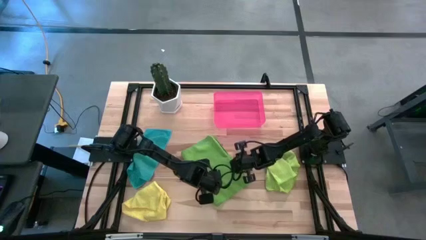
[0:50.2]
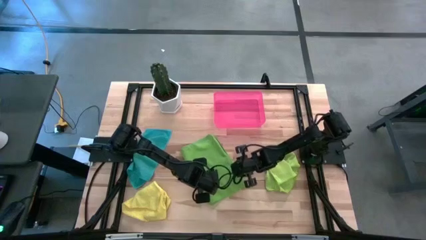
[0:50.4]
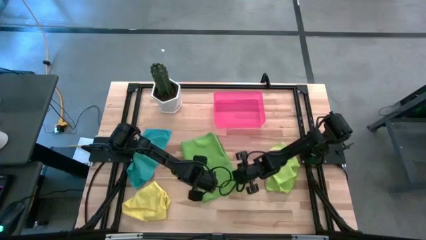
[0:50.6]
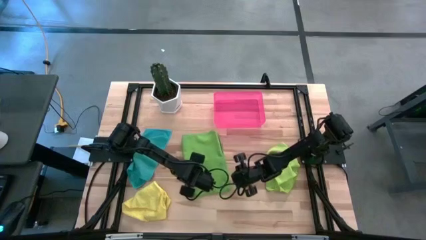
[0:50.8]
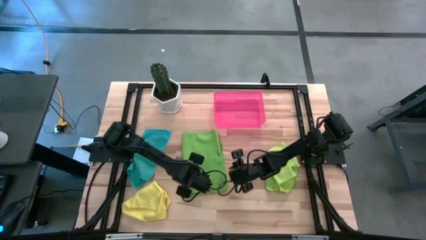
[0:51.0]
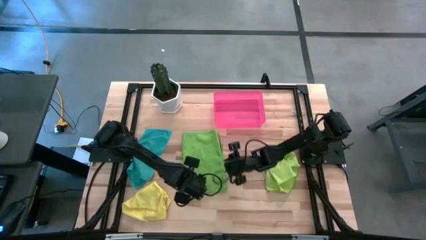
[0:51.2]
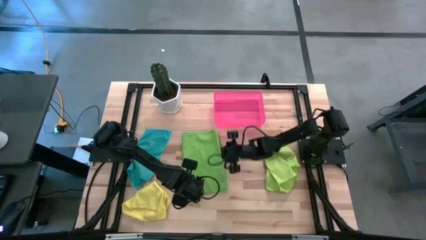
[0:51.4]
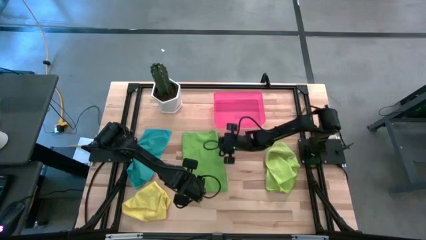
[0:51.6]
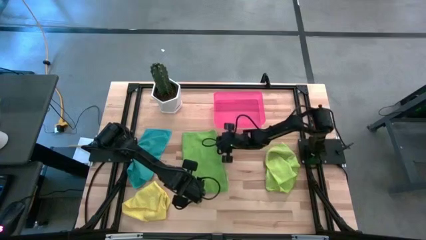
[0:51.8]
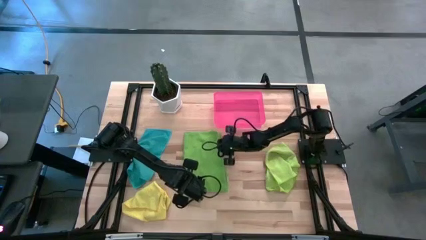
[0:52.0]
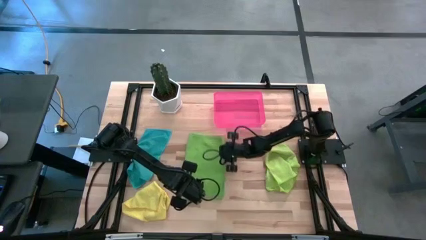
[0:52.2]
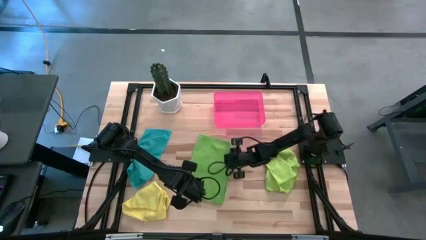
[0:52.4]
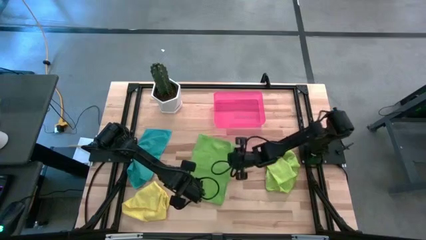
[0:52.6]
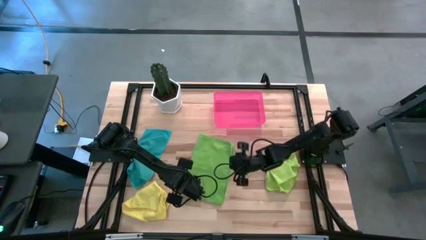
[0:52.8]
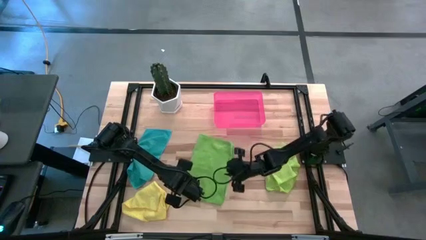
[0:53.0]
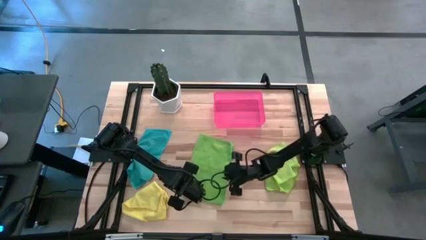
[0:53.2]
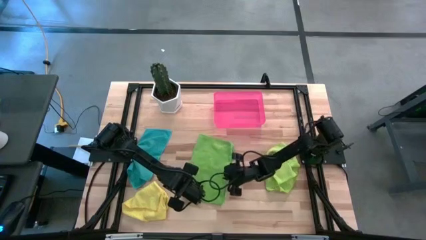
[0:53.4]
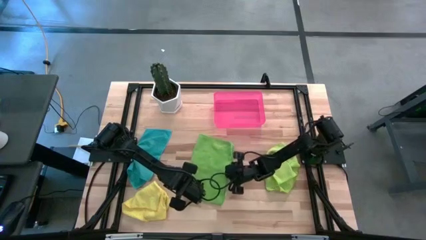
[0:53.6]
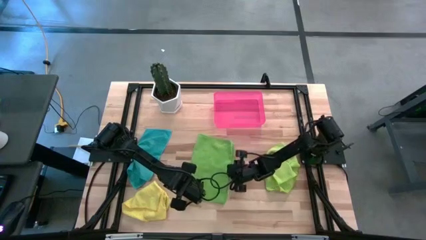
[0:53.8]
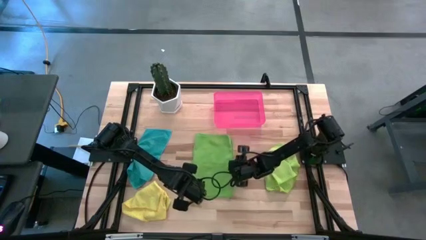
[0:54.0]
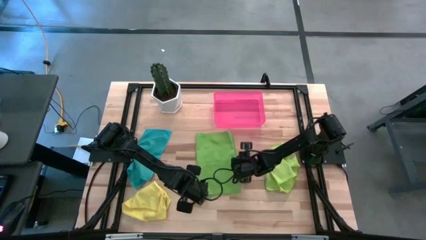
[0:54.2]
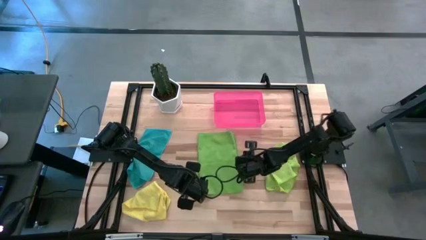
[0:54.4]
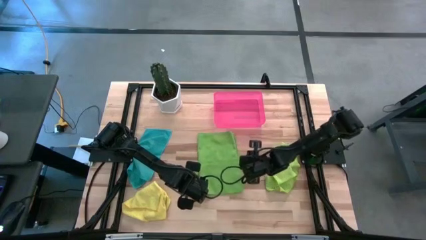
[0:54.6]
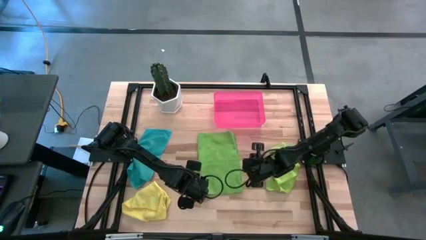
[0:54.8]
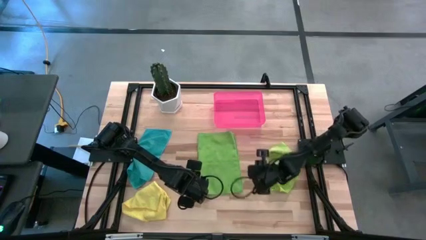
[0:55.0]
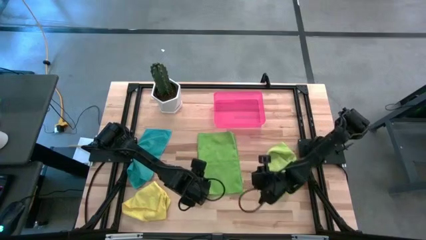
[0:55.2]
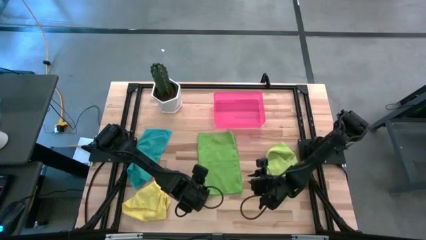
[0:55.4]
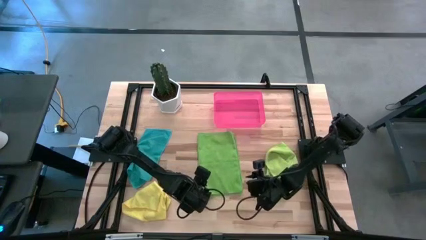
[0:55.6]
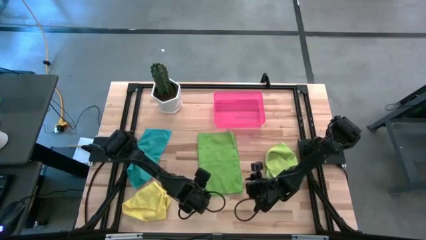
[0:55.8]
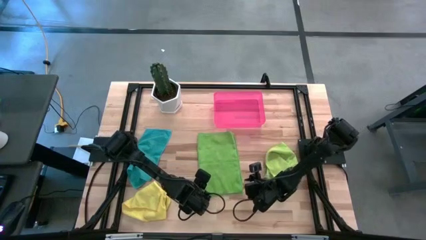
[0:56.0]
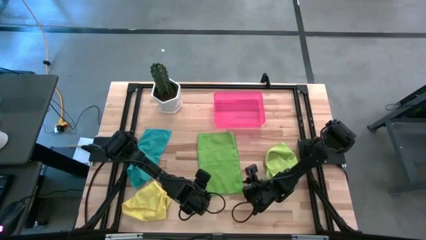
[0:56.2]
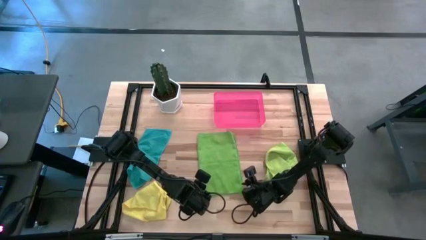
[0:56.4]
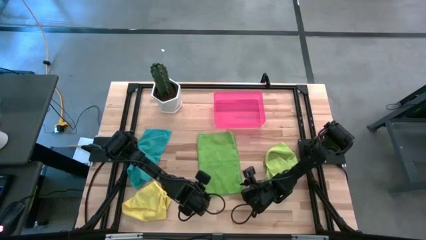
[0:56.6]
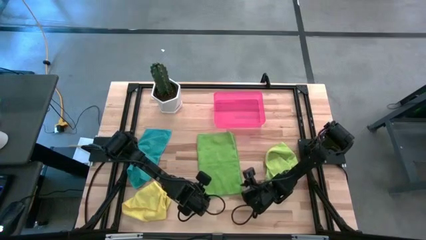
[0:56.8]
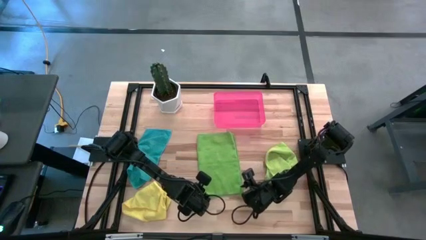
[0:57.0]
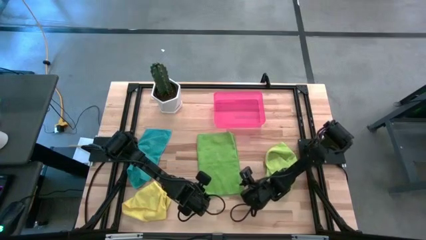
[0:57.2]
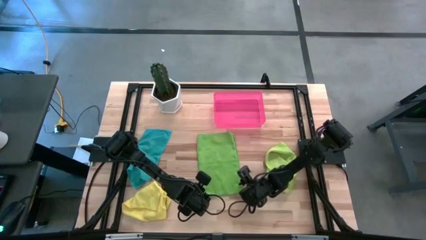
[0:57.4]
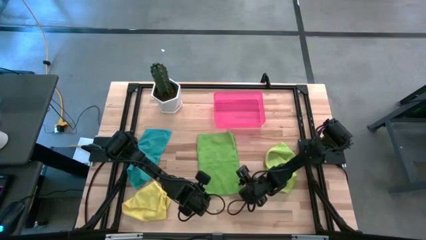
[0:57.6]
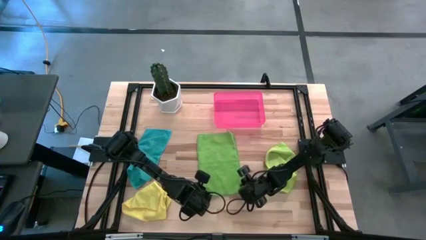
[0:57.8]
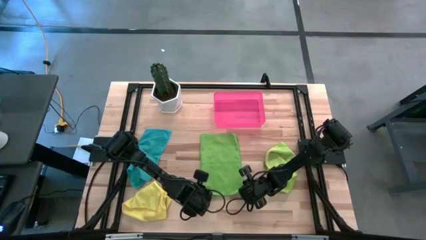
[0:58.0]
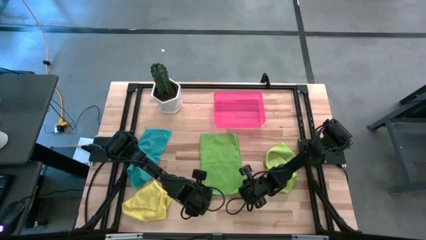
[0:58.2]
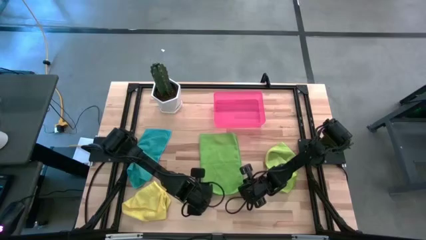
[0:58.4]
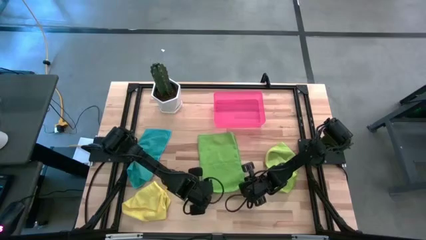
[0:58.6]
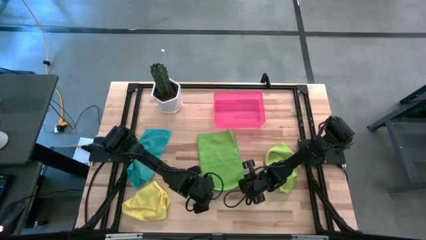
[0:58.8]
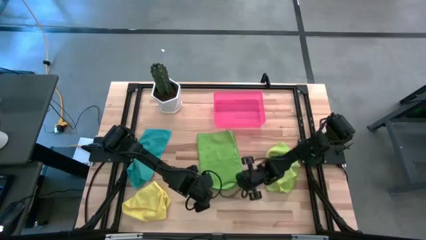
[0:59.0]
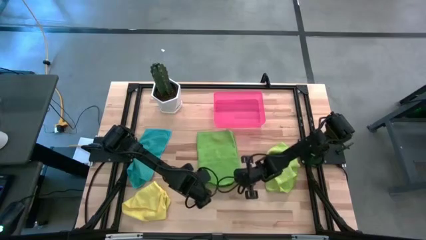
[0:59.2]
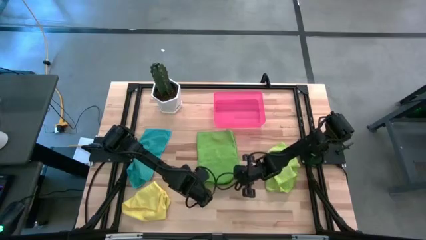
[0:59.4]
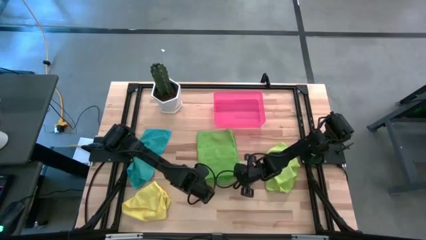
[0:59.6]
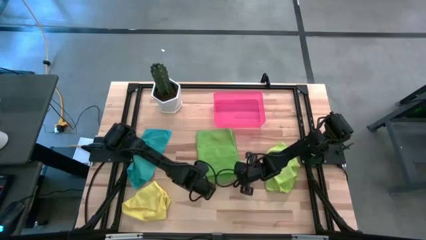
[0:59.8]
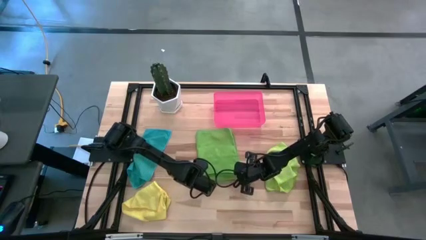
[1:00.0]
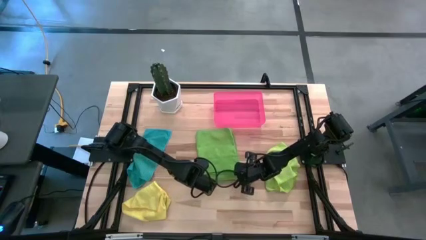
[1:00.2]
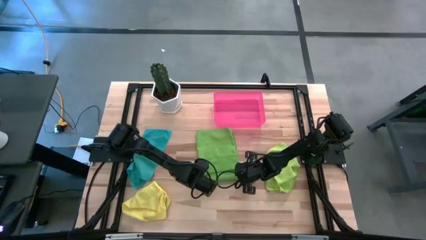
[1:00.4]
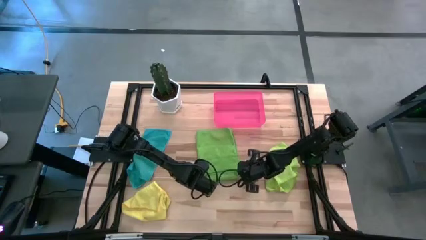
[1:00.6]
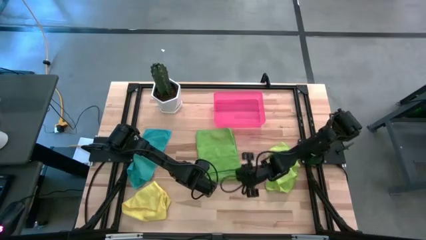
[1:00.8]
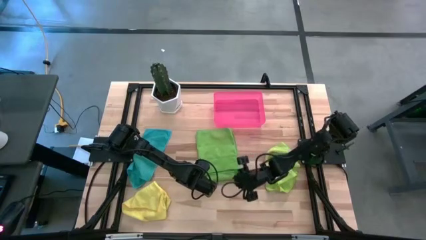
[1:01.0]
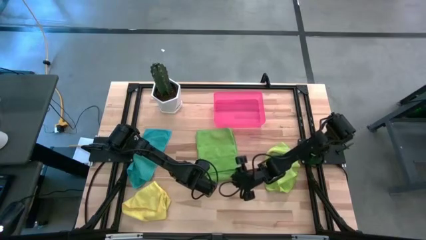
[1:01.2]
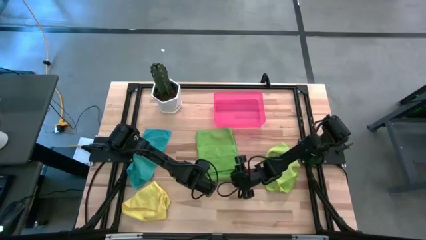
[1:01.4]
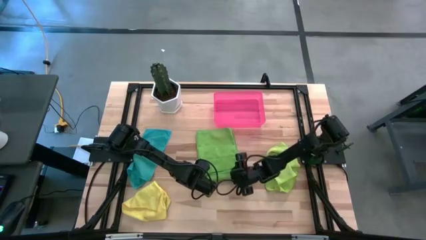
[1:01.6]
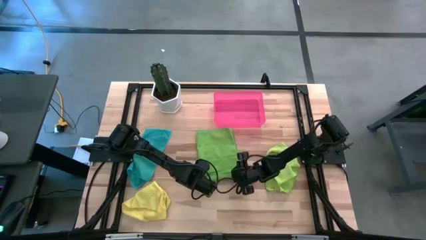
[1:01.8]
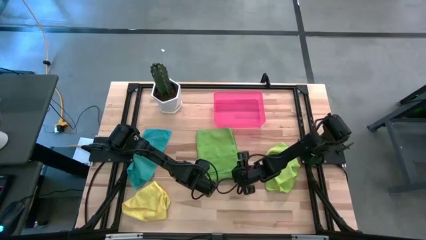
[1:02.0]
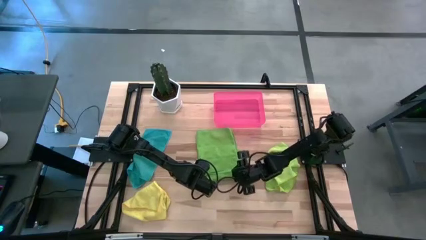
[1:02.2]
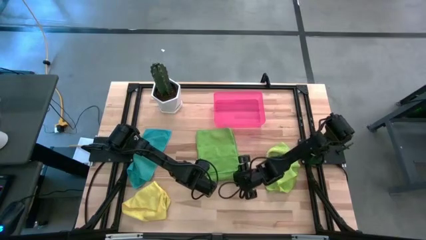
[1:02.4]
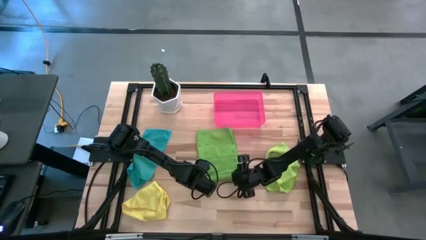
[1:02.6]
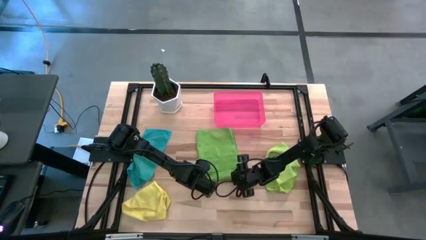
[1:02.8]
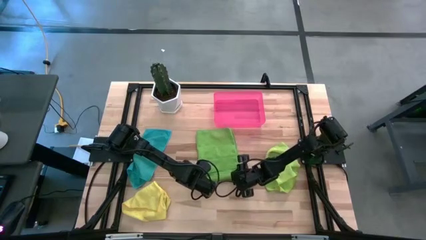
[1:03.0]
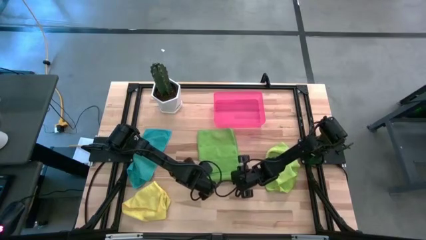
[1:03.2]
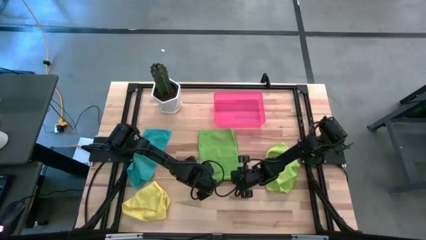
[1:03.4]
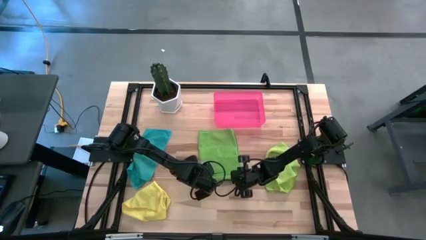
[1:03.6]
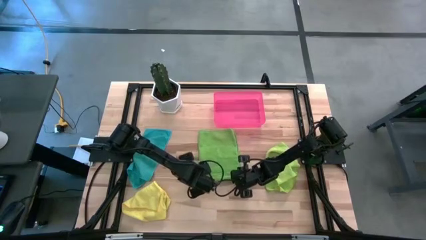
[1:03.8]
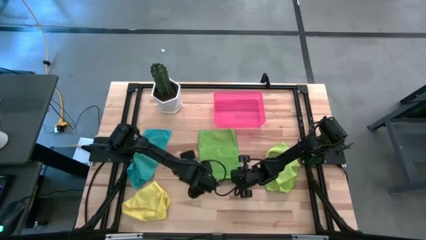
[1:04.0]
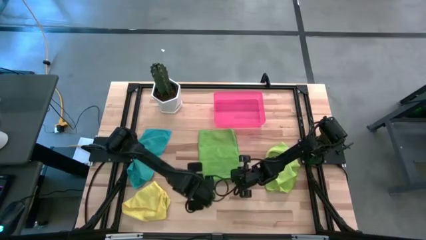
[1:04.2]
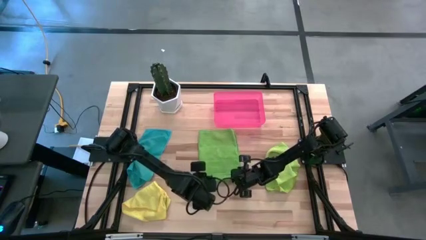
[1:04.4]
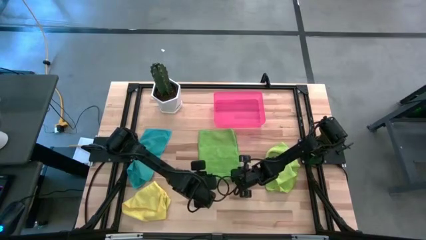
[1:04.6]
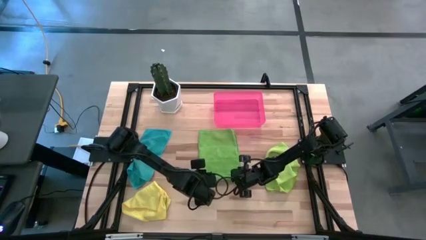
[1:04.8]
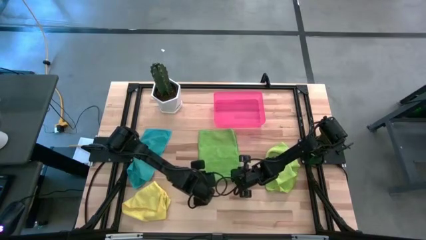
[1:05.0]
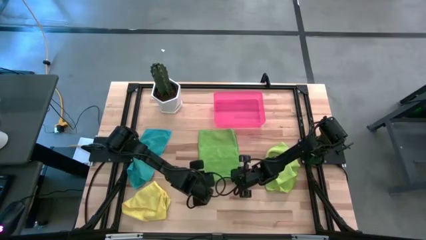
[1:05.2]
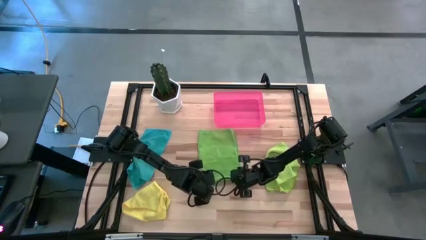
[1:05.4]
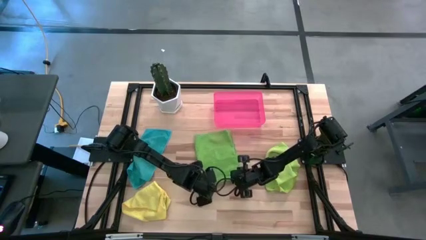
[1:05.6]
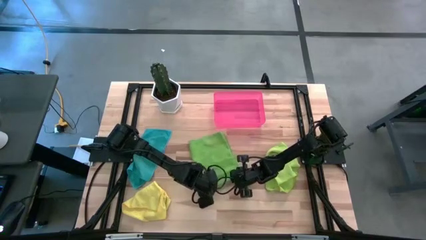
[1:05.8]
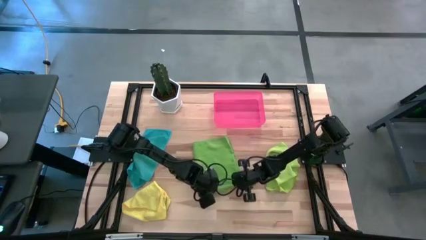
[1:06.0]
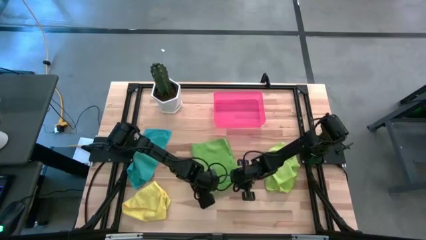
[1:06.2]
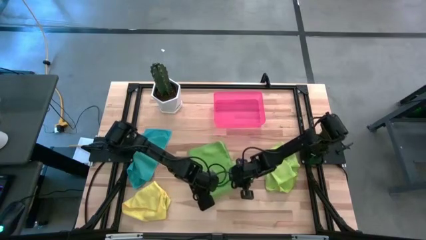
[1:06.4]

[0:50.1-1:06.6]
Task: Roll microfiber towels into tight, uniform cylinder then place into a basket
Roll the green microfiber cloth
